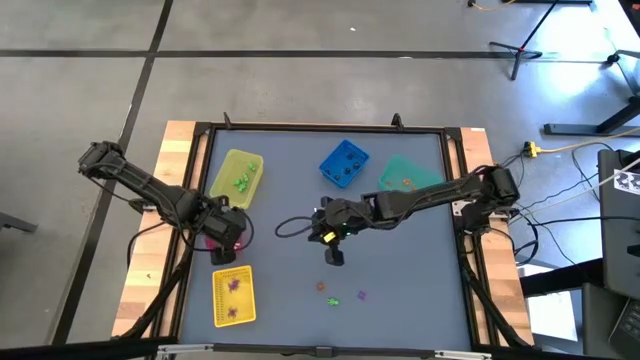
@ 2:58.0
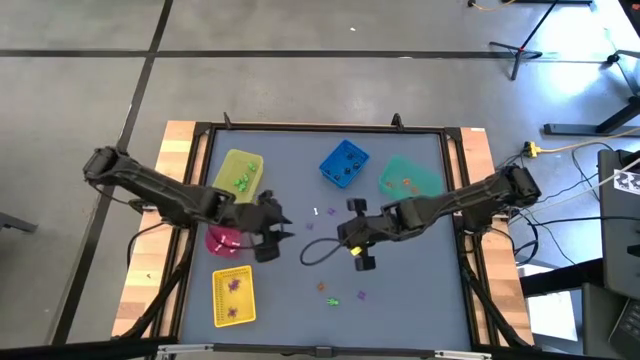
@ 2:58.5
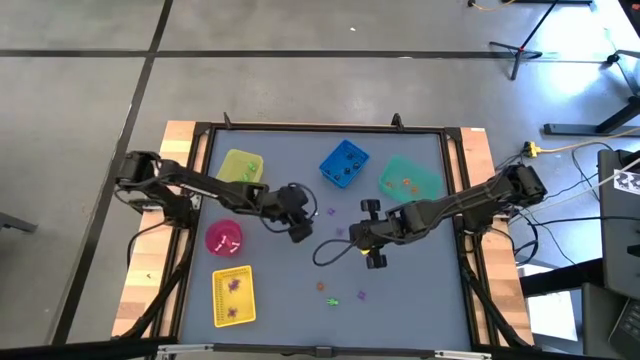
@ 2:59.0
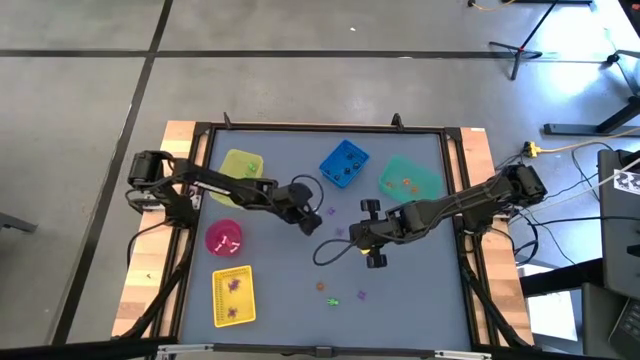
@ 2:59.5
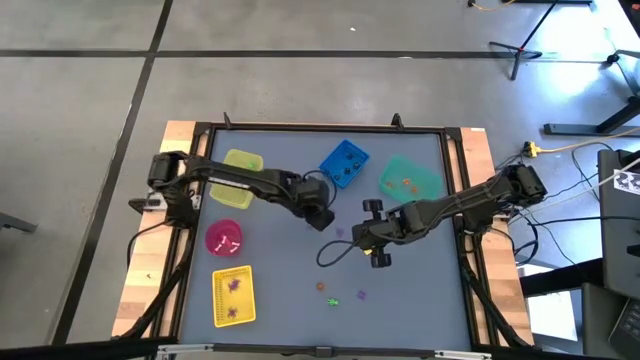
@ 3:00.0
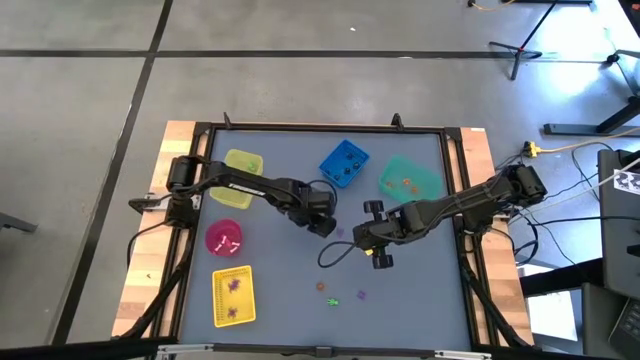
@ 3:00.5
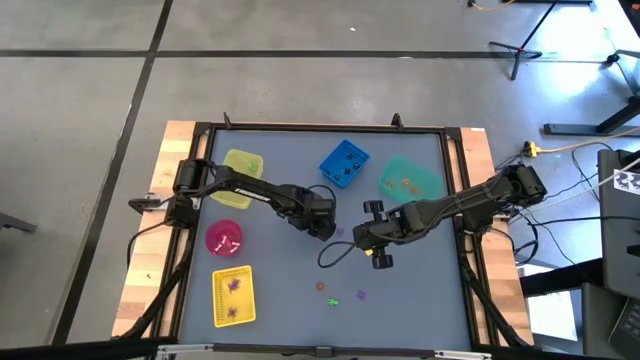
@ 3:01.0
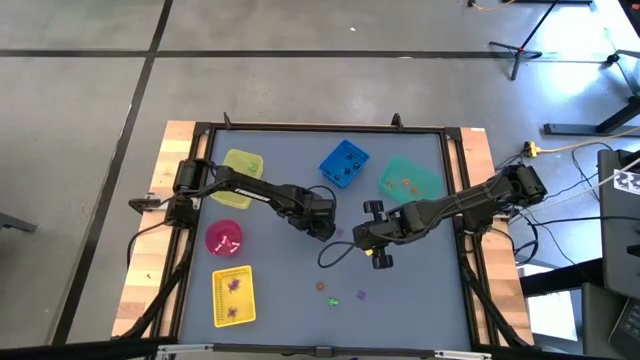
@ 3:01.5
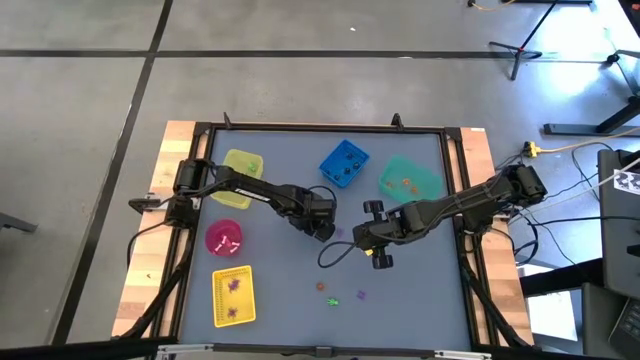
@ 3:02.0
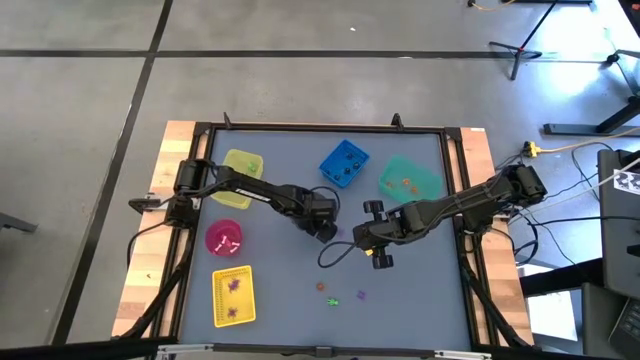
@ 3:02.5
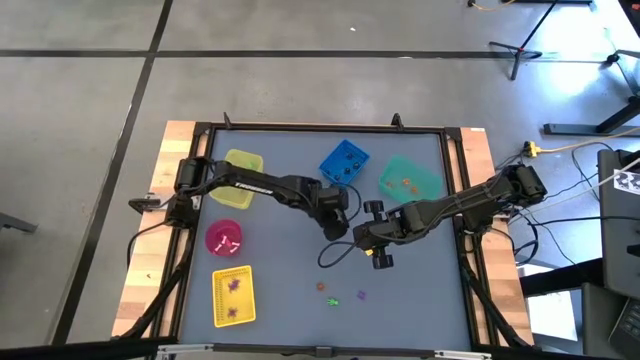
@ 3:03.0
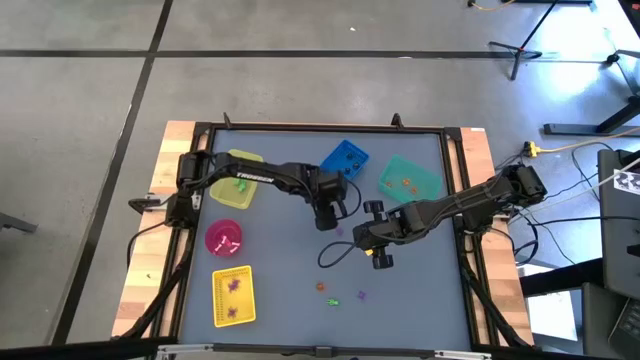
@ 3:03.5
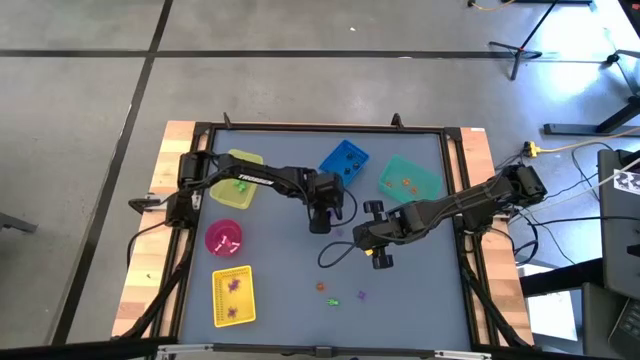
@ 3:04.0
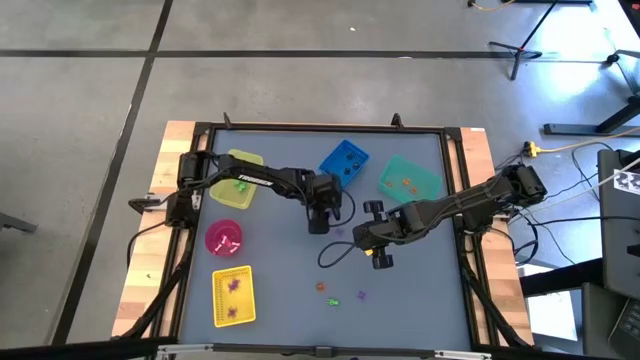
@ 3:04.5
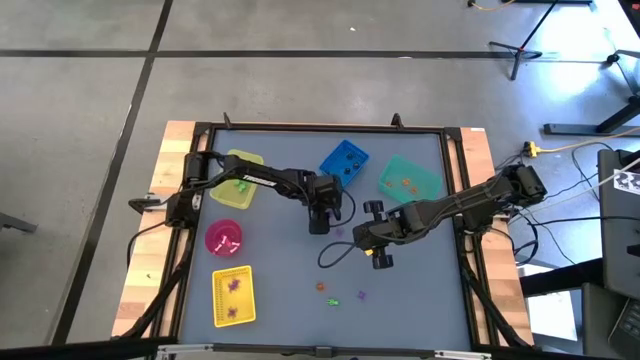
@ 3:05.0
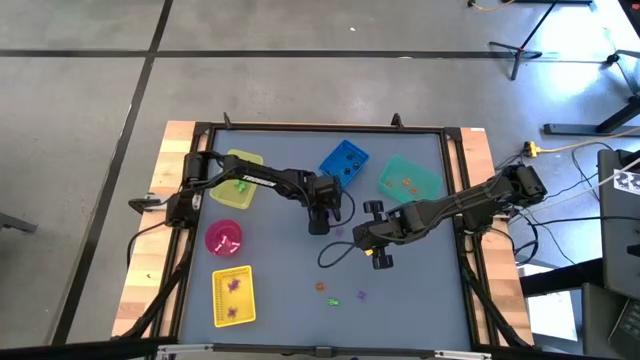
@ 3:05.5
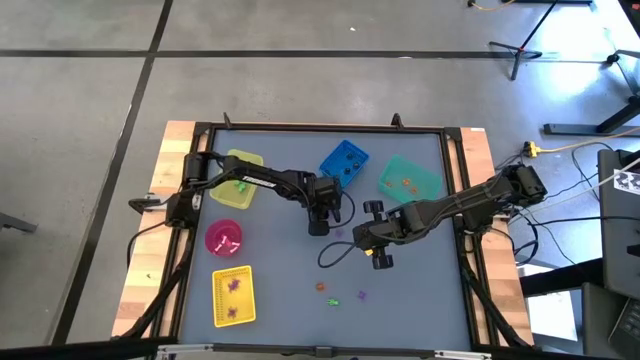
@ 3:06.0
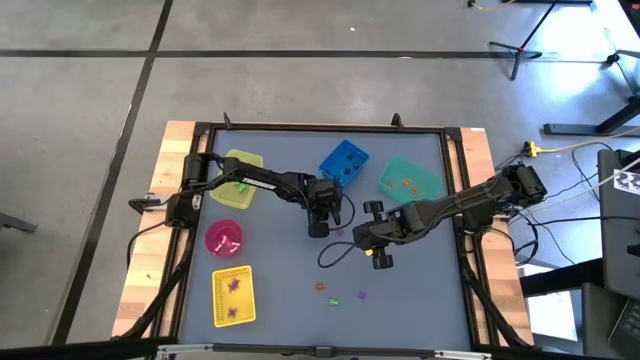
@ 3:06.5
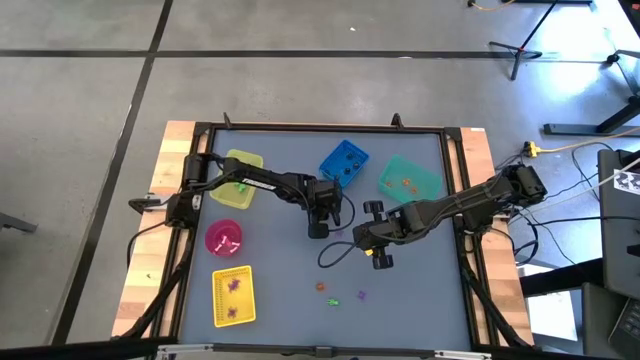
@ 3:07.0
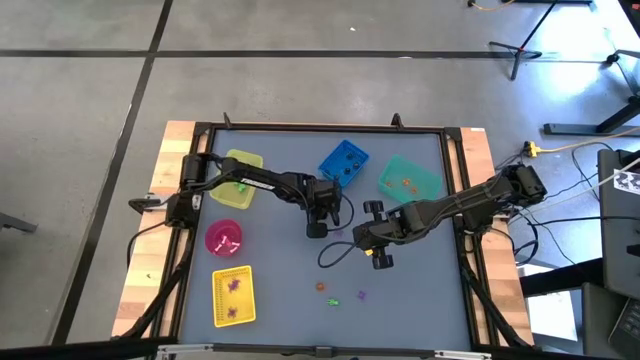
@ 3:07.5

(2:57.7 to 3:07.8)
Task: Sort Halloween decoration
Put the purple spider toy into the yellow basket

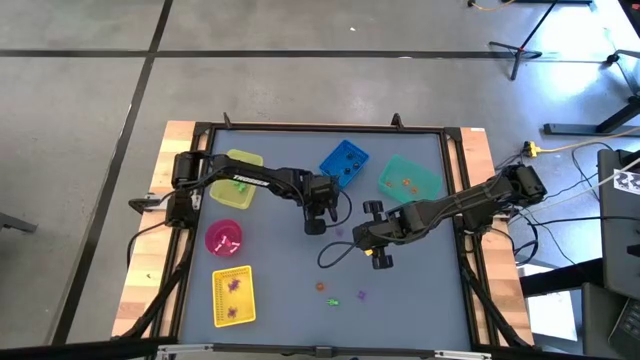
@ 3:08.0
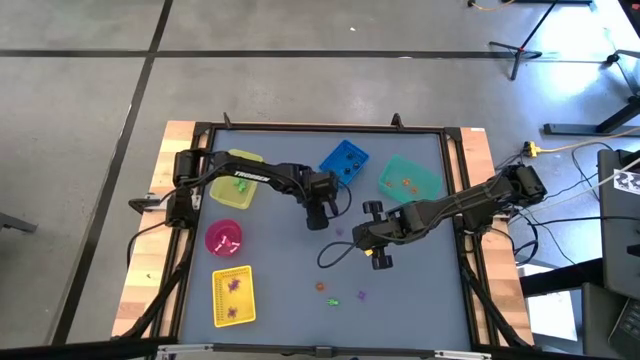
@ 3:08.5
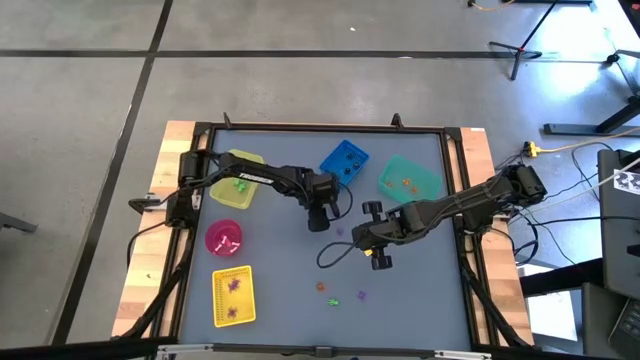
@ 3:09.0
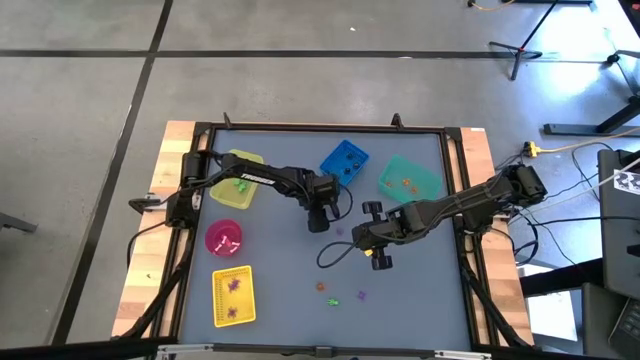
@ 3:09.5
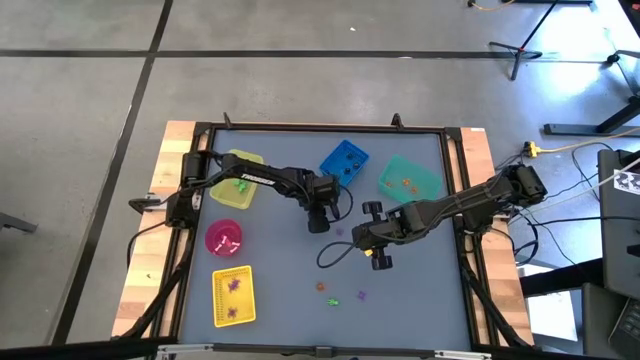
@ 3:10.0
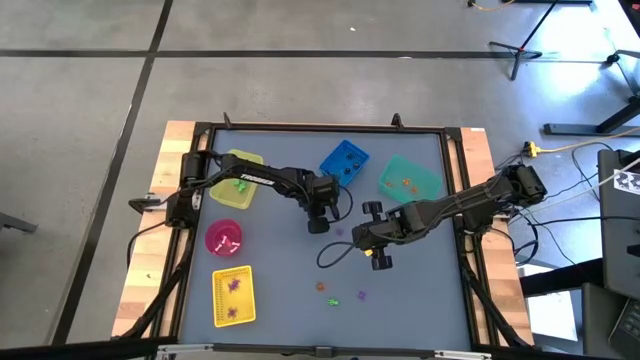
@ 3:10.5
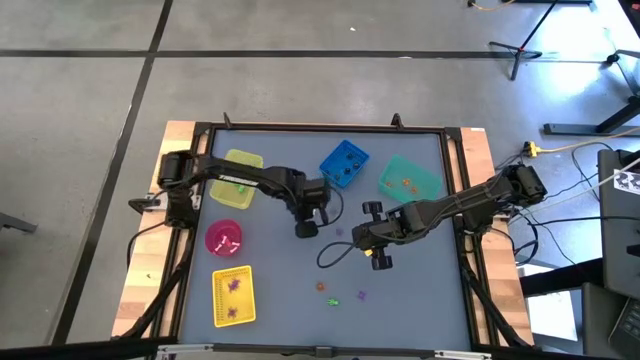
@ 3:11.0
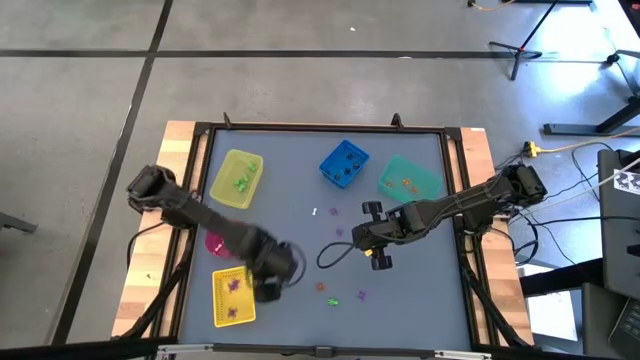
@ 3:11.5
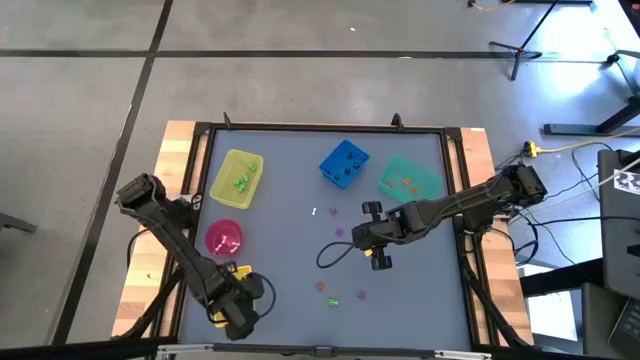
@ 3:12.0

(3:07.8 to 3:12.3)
Put the purple spider toy into the yellow basket

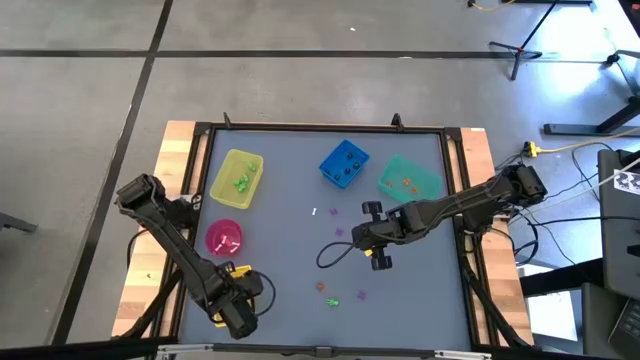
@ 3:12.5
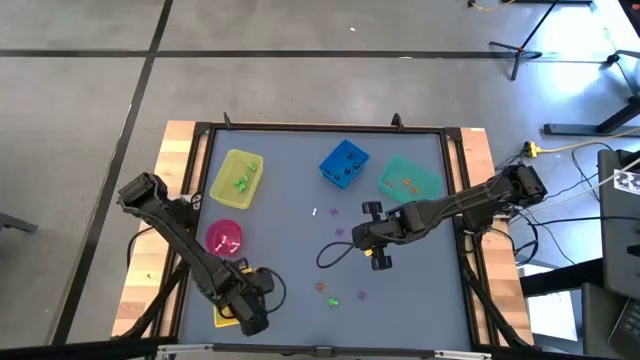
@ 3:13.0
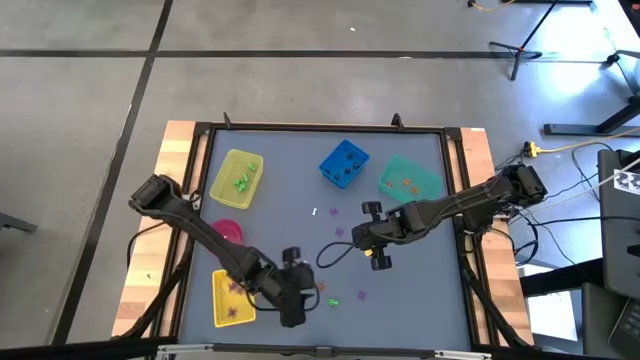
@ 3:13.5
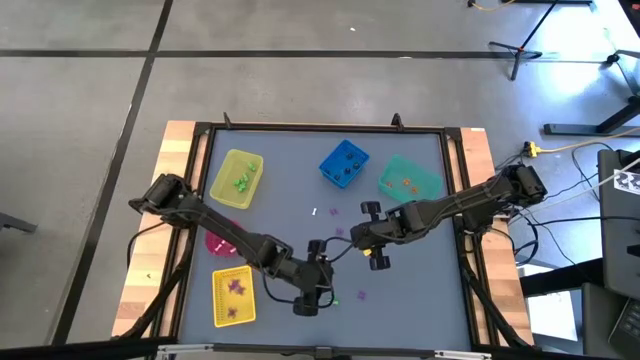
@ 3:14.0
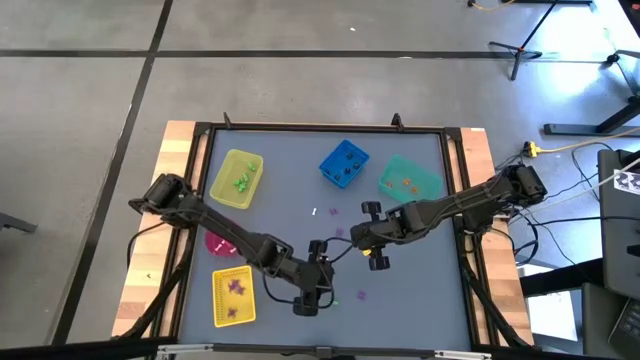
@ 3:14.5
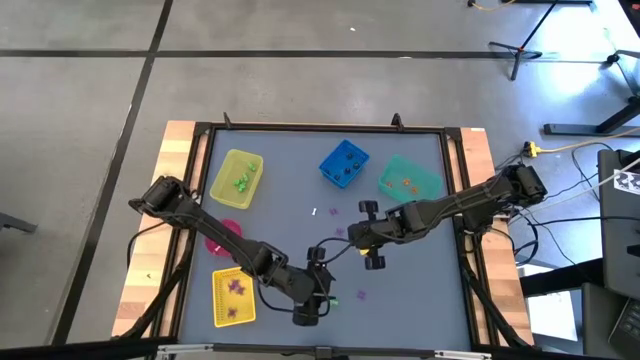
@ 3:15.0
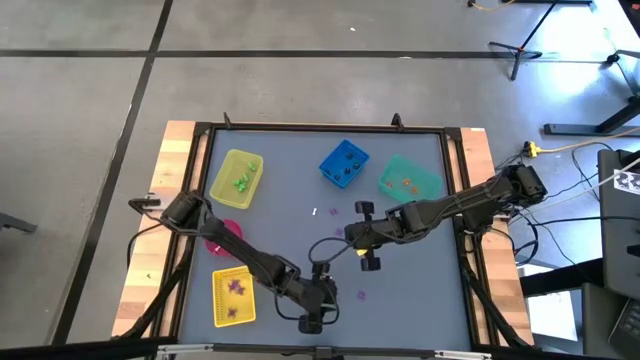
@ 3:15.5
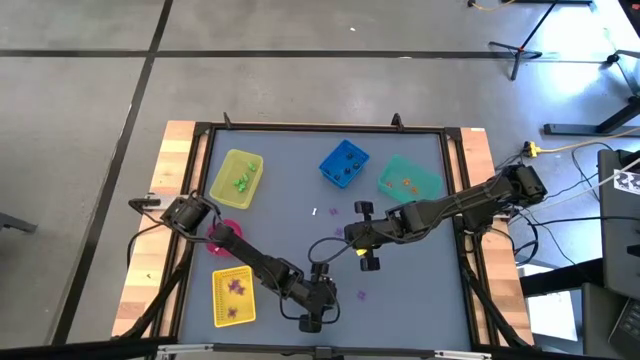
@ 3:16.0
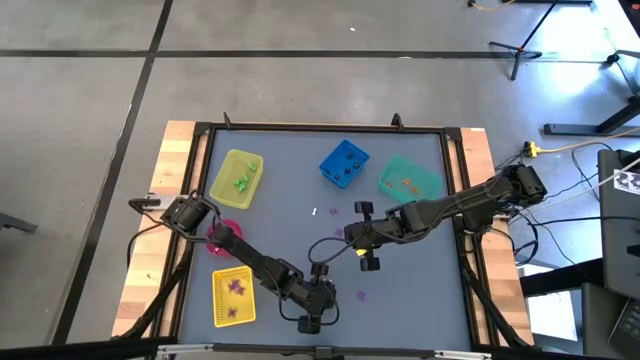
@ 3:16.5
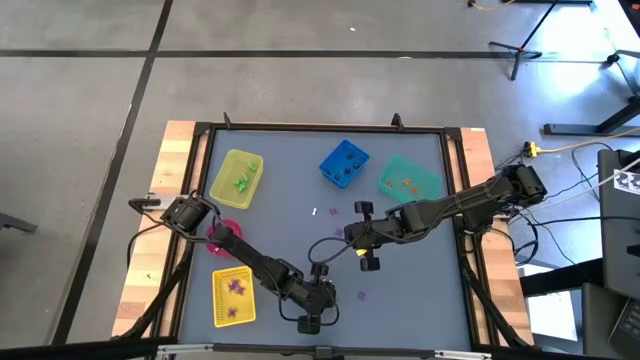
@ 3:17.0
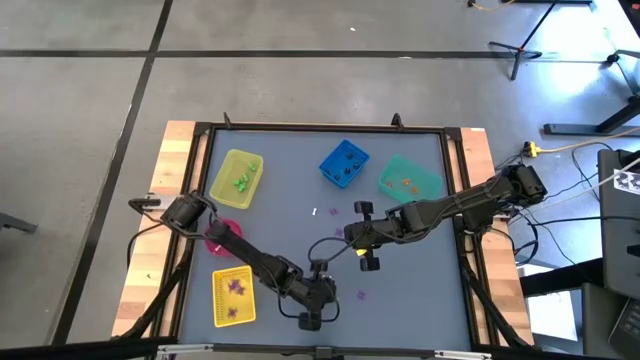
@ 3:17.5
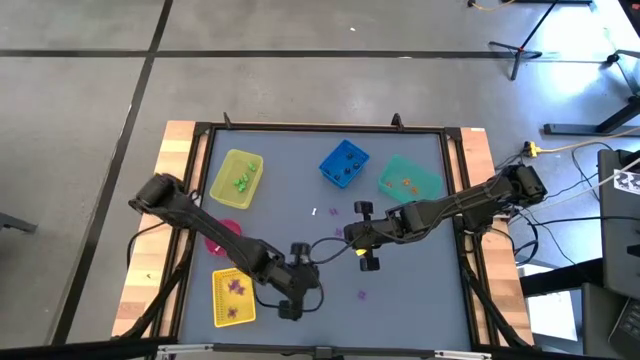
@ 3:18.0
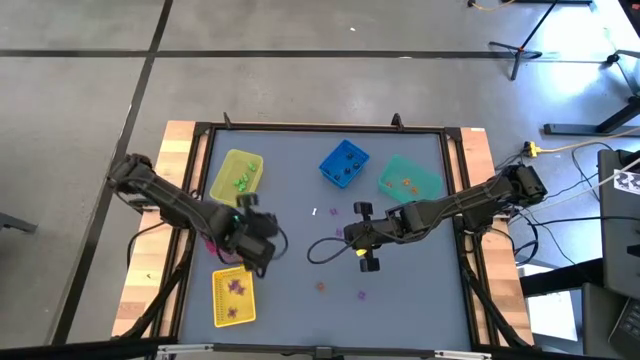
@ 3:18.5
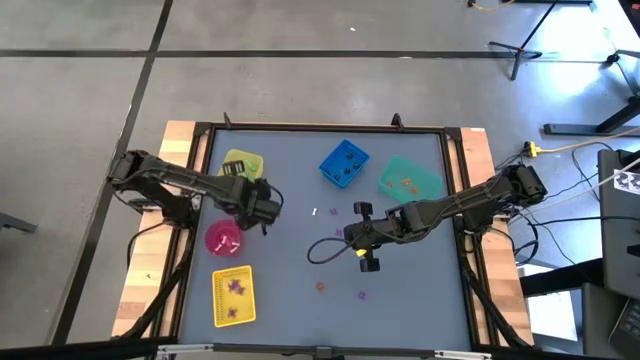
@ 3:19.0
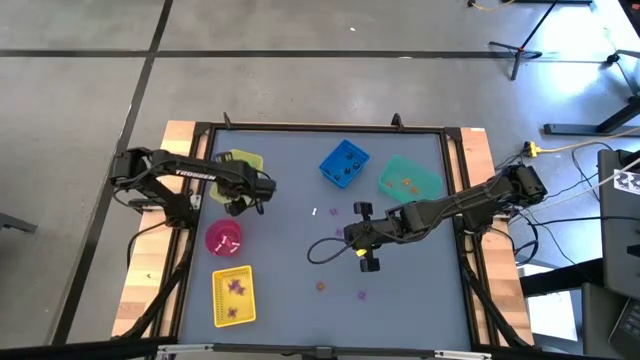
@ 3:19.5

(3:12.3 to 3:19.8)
Put the green skeleton toy into the yellow bin
